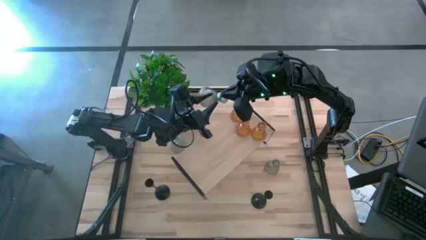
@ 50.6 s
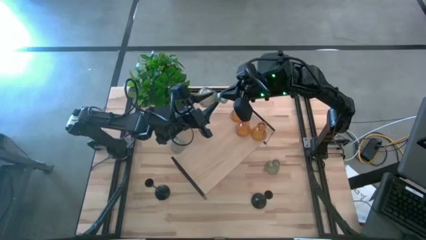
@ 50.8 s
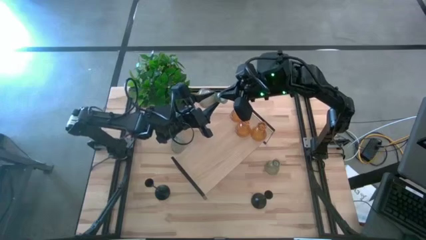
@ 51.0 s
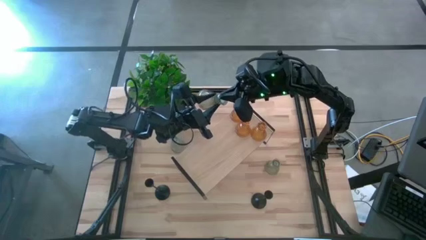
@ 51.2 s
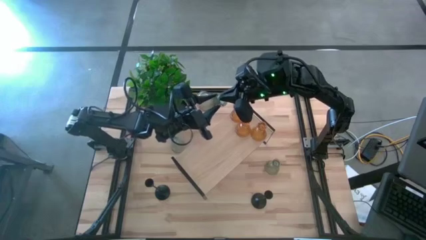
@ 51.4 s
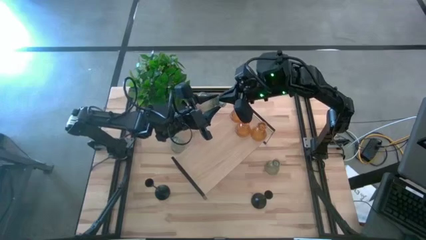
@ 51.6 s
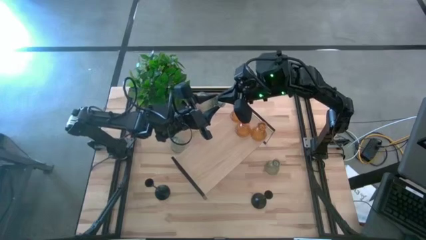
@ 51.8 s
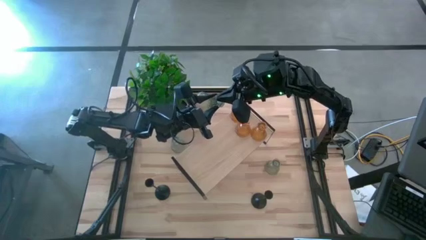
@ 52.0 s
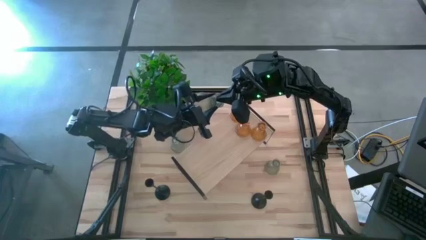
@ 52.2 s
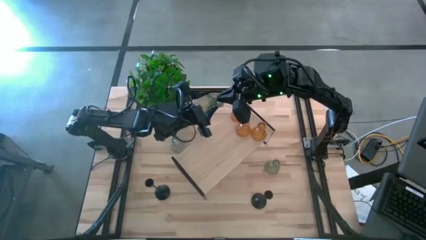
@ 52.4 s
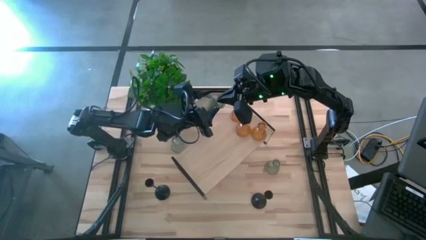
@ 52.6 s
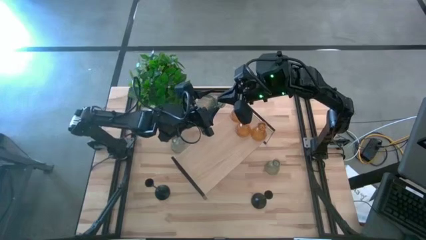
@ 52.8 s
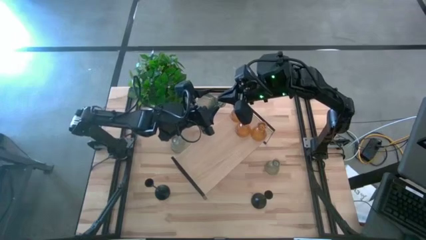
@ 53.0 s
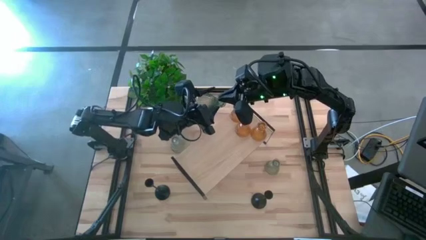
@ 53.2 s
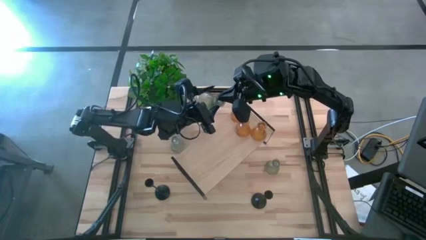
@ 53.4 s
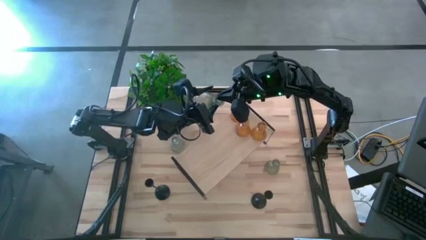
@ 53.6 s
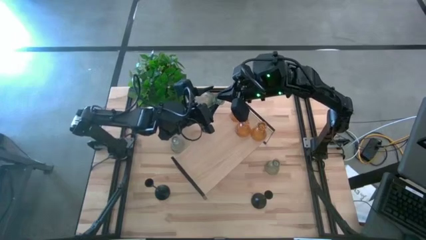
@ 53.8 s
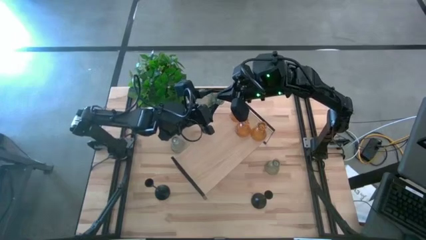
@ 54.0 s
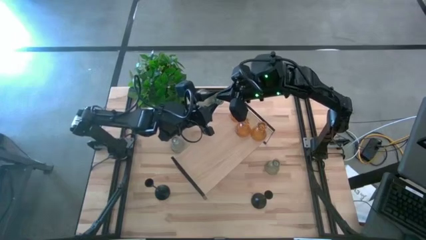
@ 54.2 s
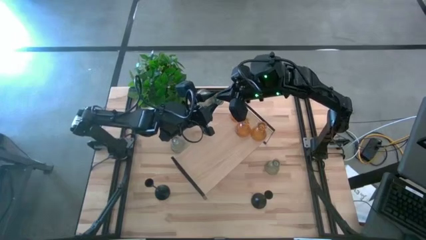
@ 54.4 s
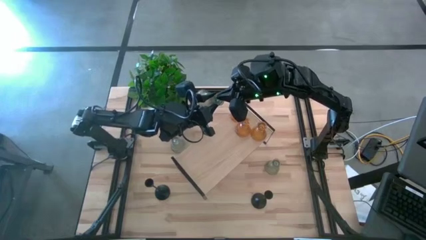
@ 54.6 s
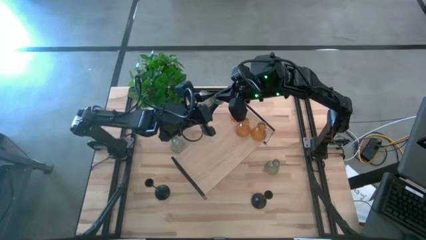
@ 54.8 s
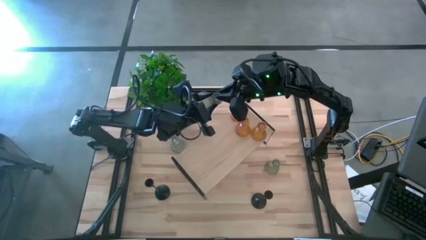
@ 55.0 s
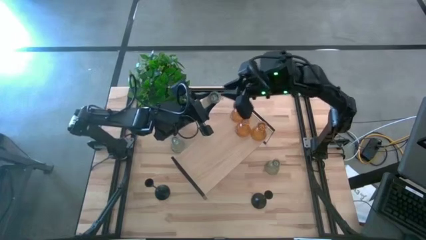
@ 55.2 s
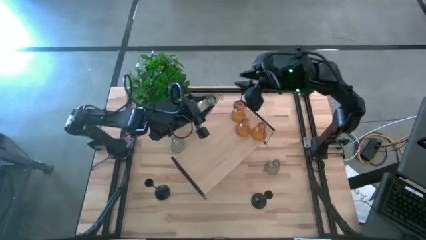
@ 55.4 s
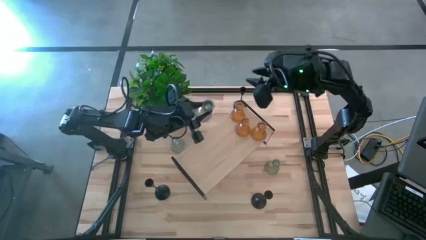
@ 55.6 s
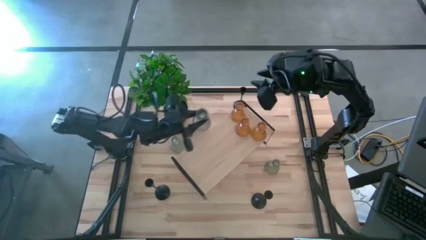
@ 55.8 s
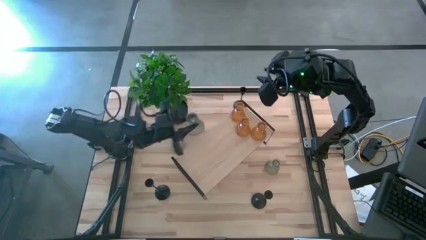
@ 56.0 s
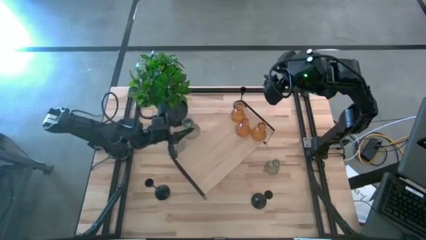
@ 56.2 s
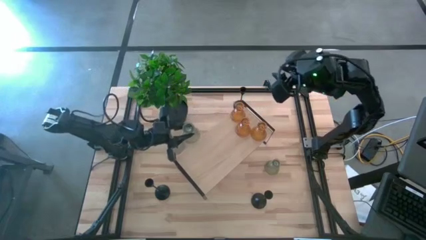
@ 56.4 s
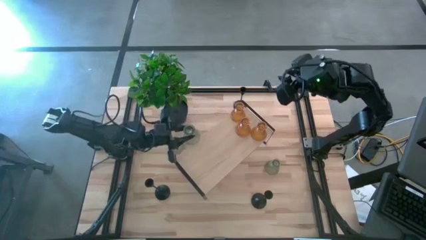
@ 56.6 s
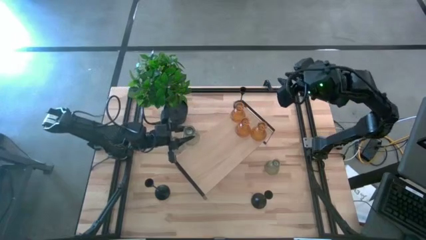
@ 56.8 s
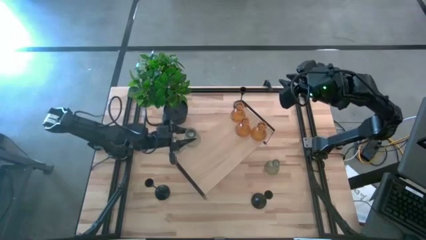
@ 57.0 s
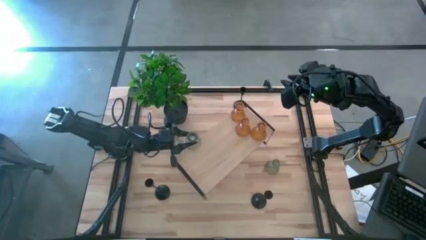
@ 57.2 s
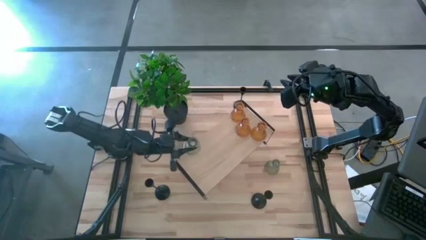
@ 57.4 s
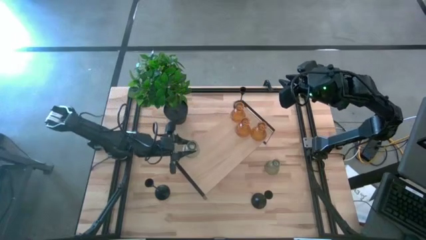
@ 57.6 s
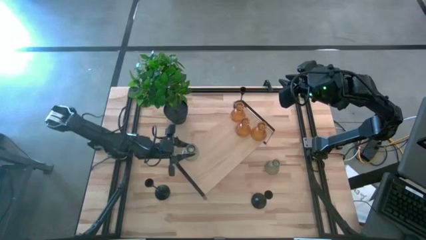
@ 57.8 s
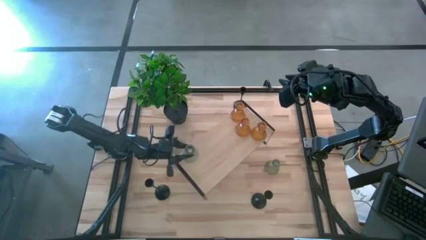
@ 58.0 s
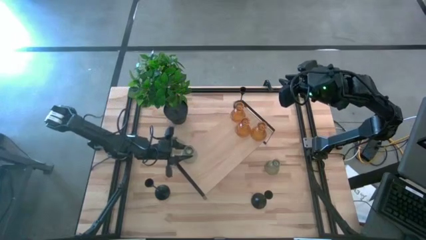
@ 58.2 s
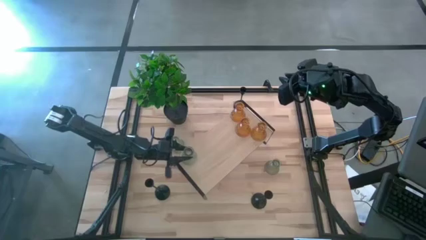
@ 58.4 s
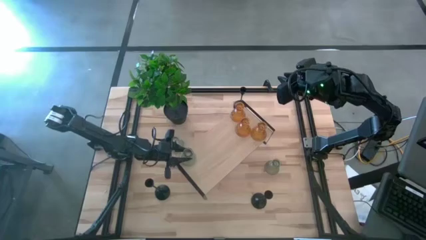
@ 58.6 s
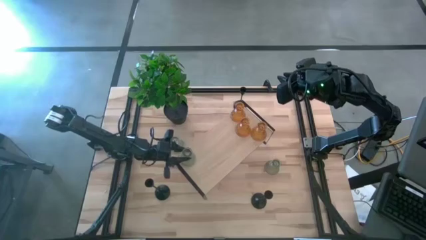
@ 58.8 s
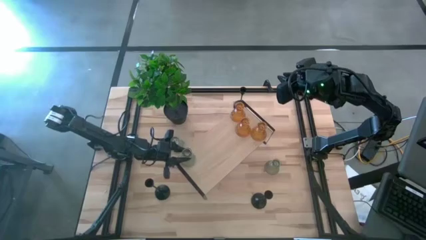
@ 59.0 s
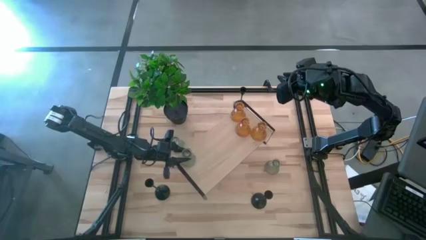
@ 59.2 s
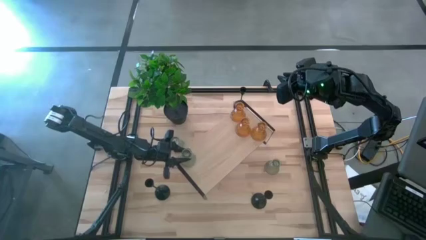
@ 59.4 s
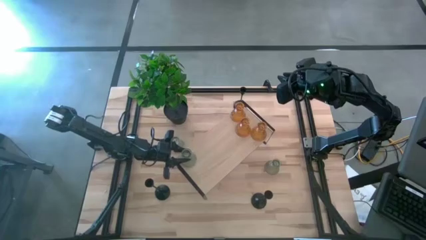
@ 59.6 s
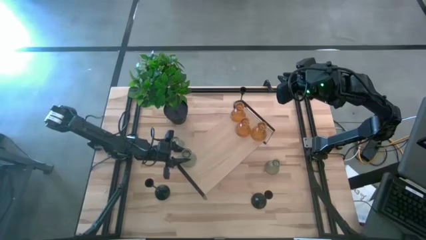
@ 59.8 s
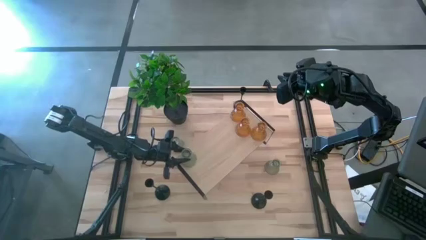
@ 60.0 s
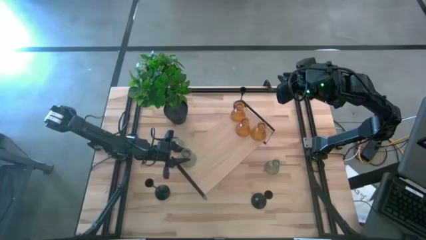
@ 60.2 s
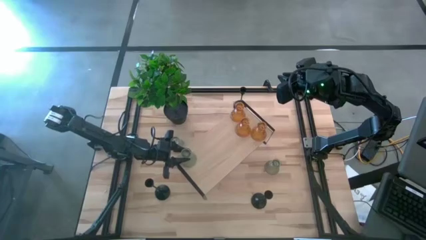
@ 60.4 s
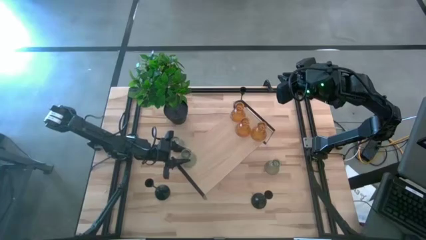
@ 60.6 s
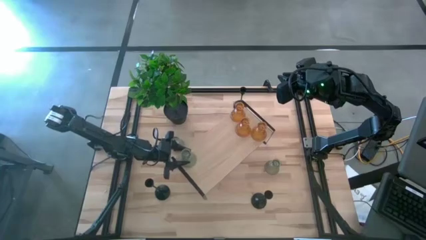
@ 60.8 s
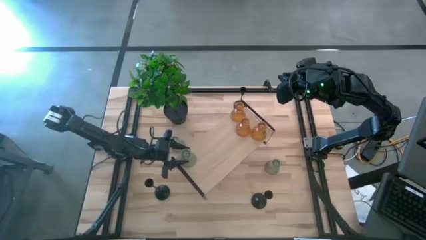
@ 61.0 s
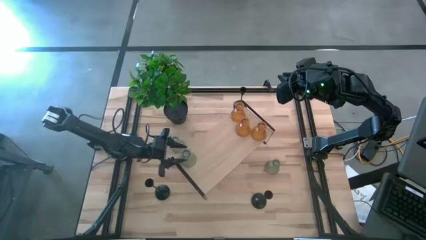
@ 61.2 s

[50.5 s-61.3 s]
Task: Pick & Place candle stick holders
Put the top transparent glass candle holder on the shelf
